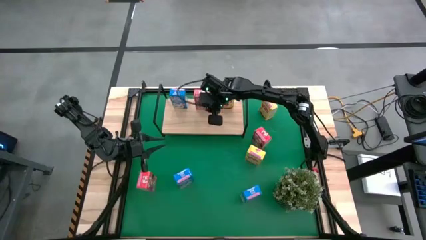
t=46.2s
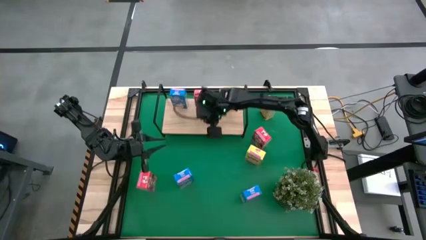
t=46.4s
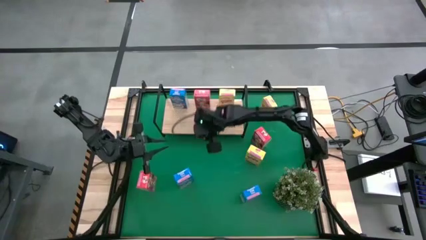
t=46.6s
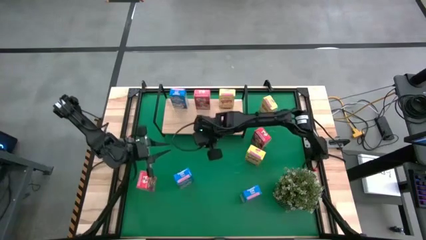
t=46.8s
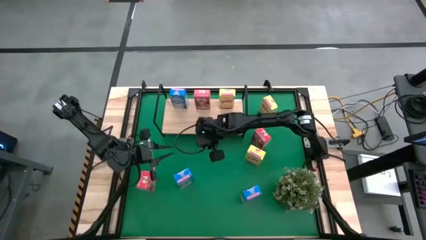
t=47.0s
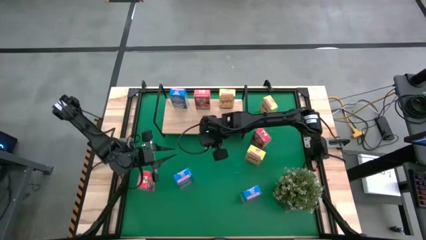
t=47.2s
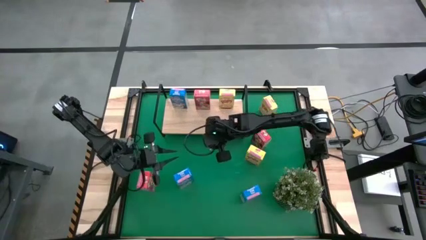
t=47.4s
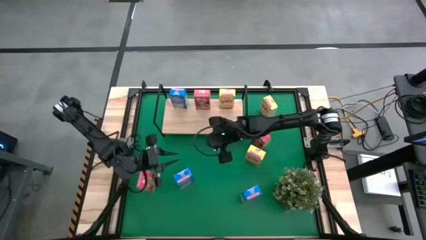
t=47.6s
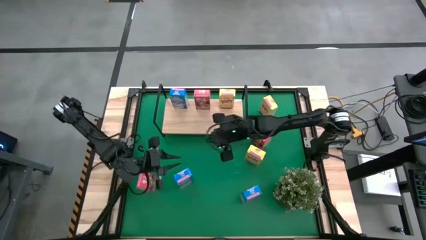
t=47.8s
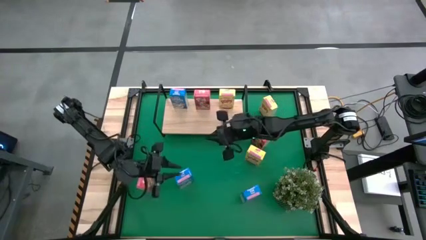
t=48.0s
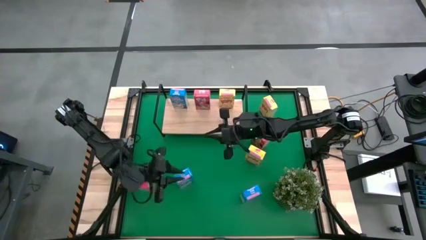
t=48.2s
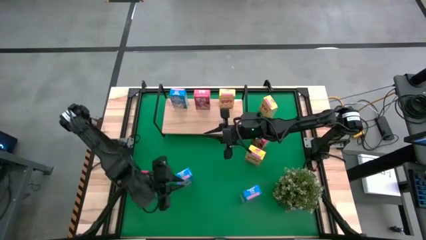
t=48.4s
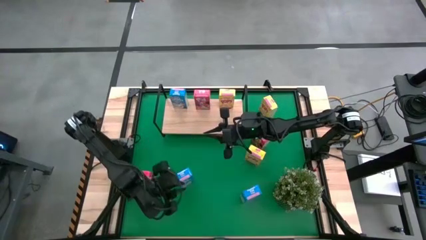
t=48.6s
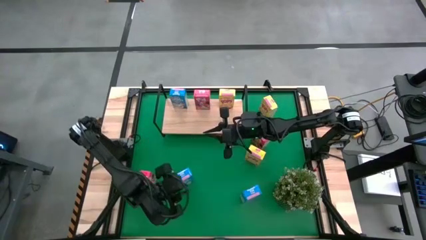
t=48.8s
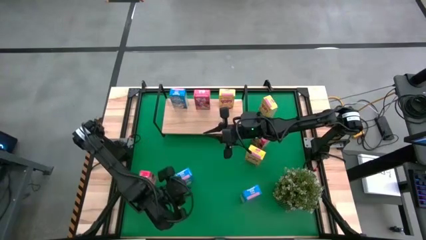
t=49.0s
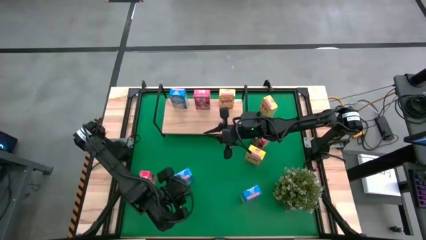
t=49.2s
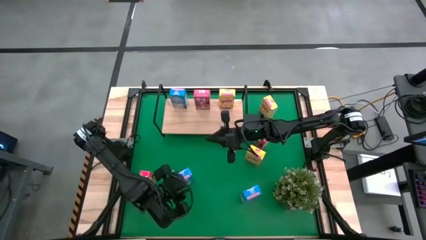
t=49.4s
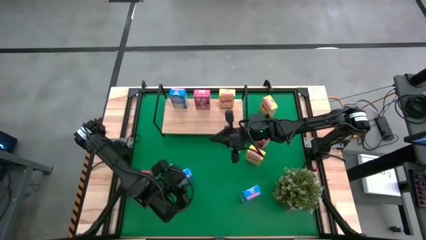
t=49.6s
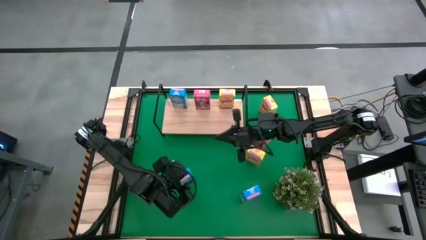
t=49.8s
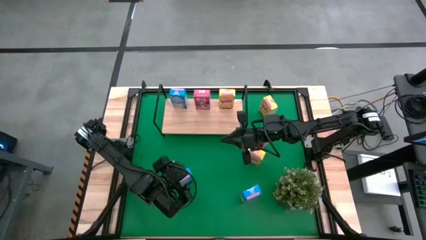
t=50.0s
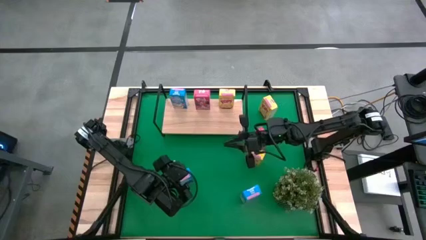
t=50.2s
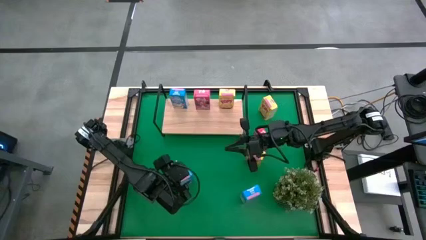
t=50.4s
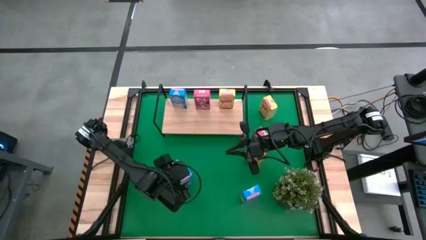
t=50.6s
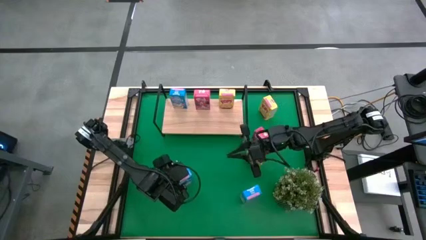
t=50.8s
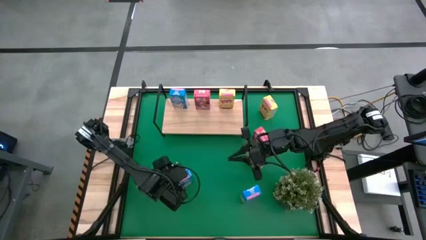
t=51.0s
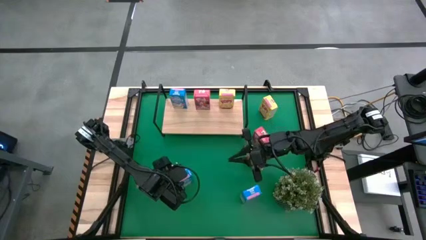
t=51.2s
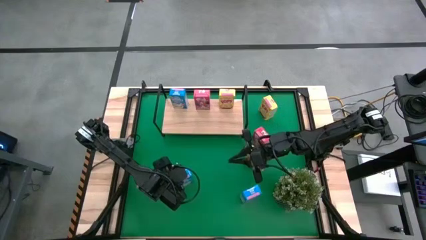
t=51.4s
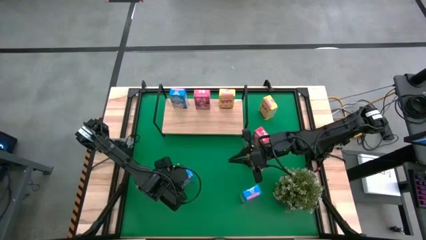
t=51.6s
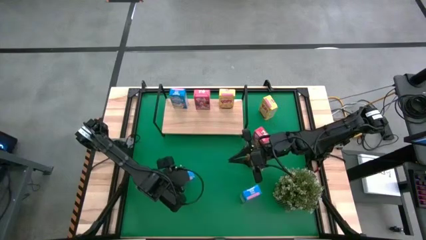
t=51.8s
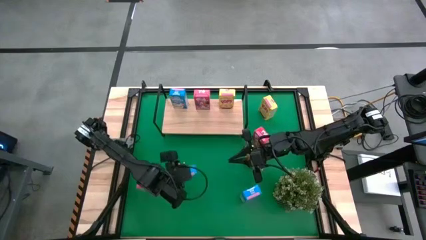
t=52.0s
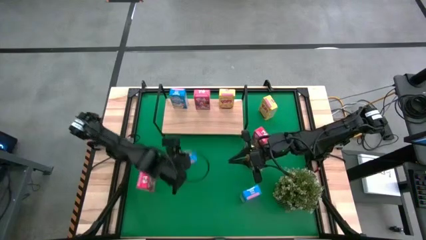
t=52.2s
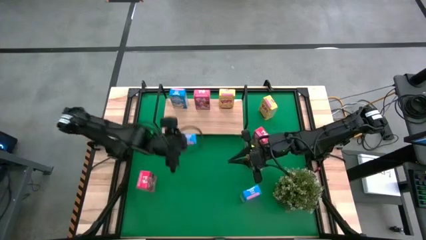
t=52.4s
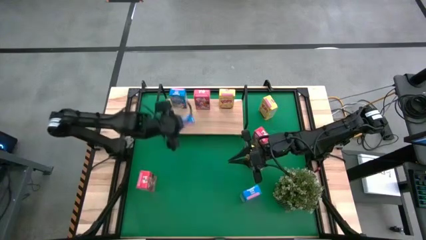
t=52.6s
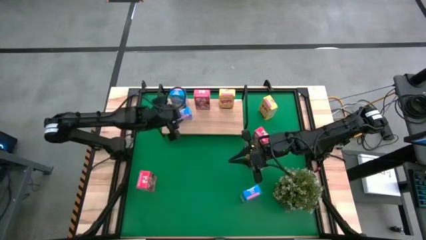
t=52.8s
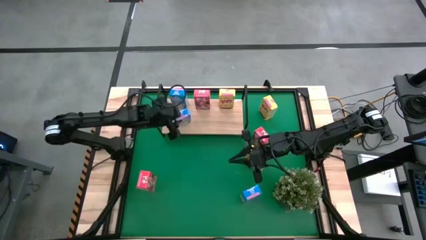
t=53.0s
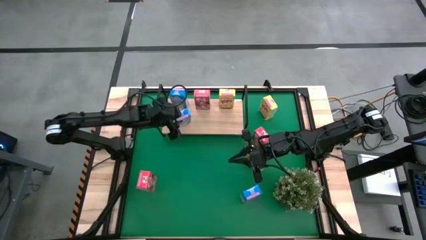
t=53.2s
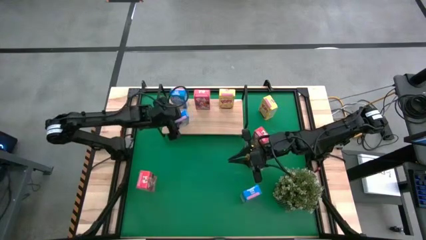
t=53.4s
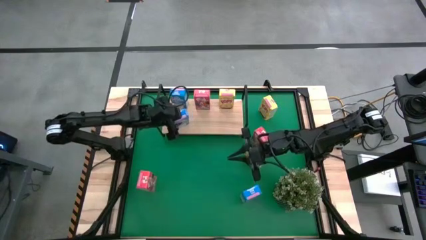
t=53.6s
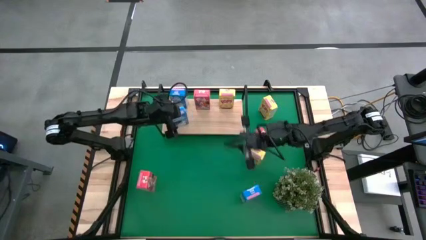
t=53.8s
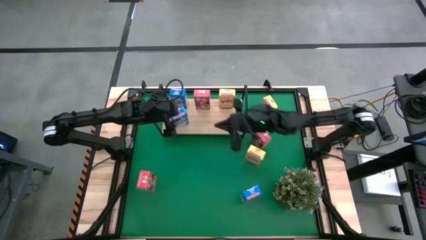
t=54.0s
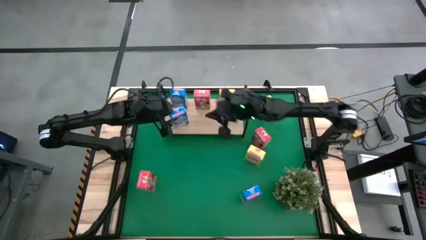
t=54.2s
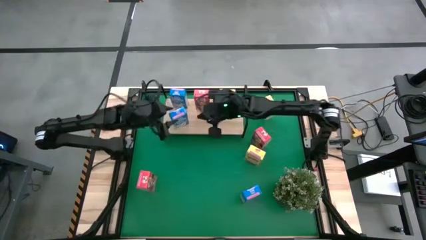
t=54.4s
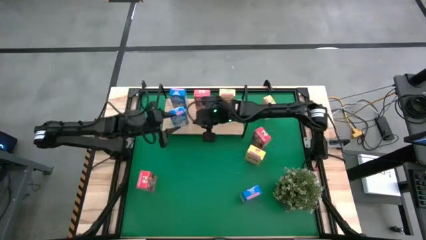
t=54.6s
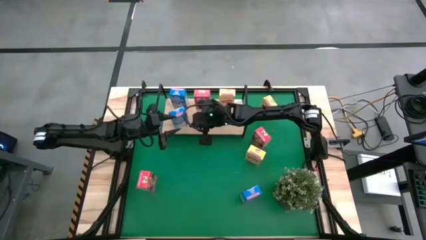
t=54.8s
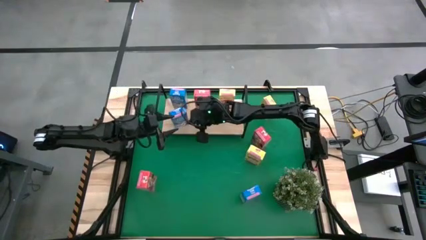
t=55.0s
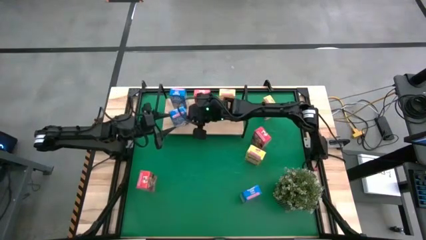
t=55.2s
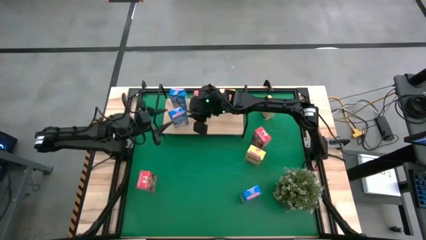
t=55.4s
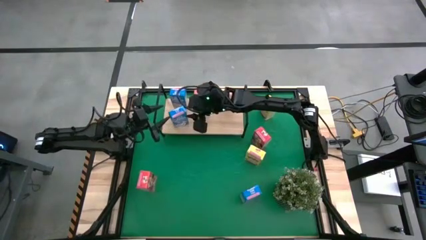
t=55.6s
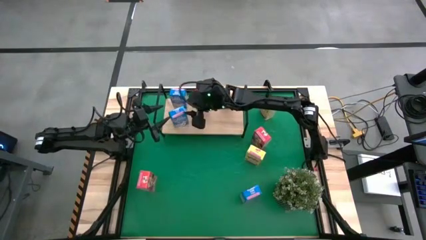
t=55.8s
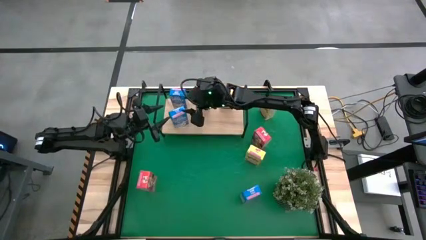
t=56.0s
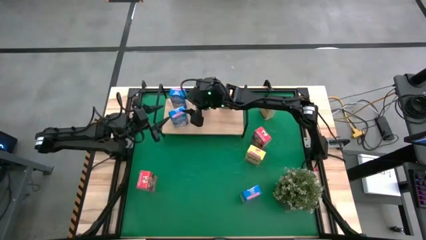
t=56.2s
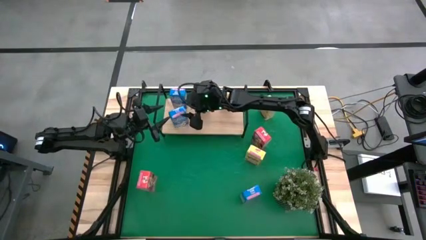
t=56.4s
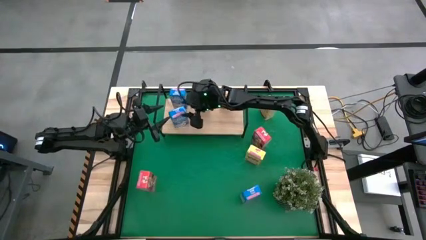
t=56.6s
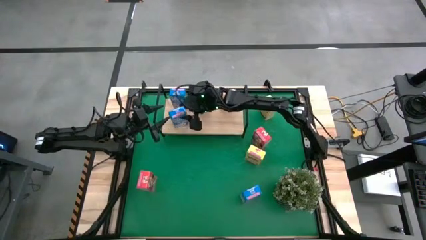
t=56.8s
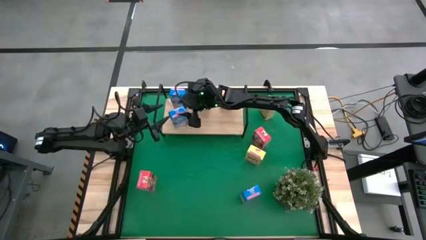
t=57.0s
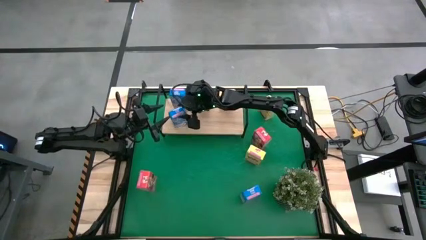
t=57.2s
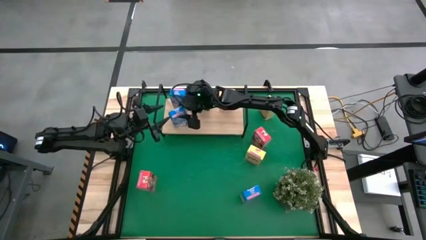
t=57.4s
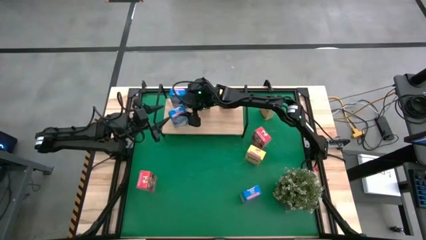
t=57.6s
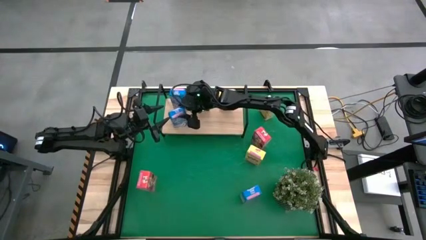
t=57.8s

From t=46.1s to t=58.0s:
Task: Stack cereal on shelf
Put the left blue cereal box on the shelf aligned with the other blue cereal box

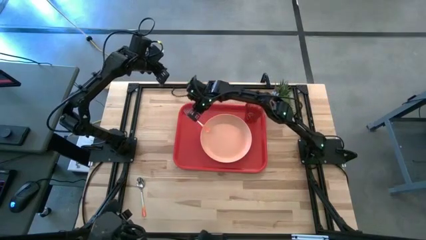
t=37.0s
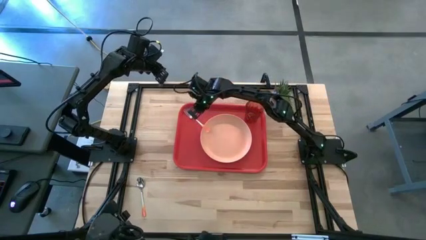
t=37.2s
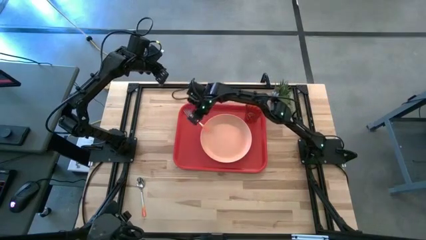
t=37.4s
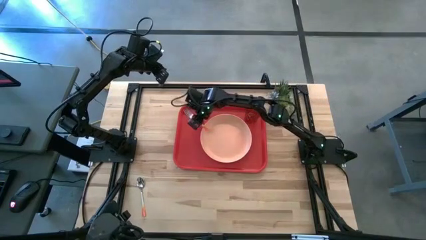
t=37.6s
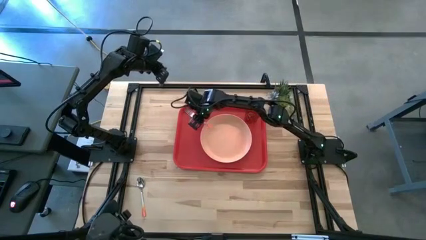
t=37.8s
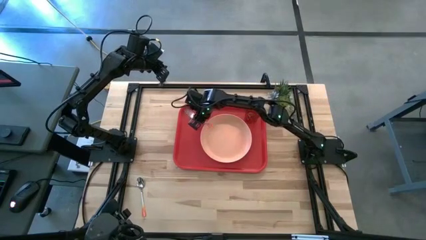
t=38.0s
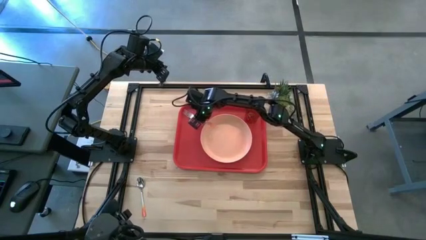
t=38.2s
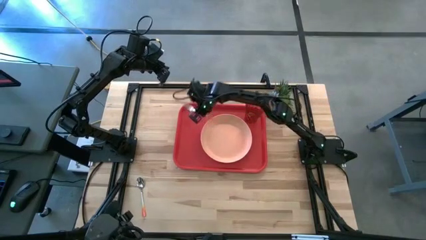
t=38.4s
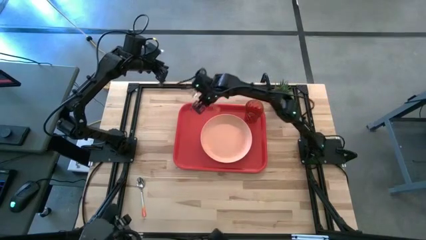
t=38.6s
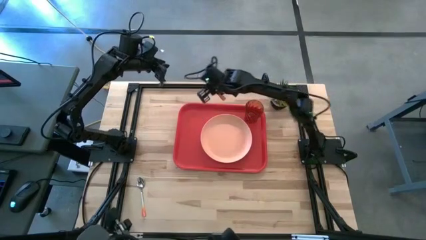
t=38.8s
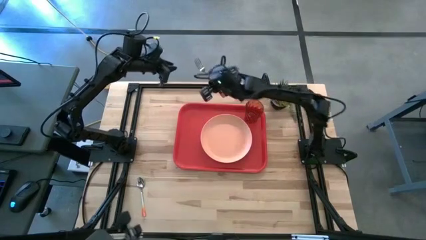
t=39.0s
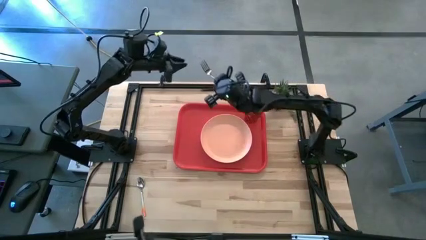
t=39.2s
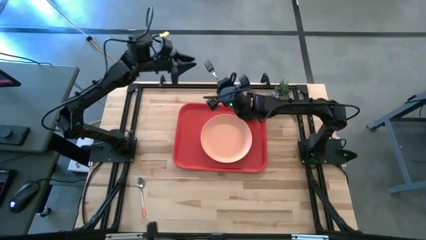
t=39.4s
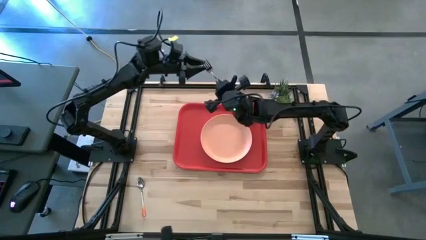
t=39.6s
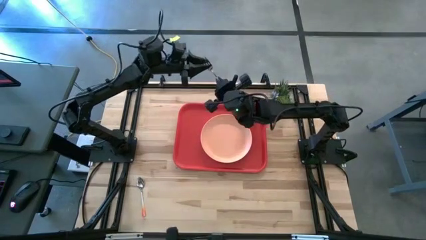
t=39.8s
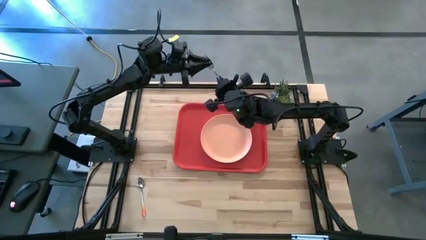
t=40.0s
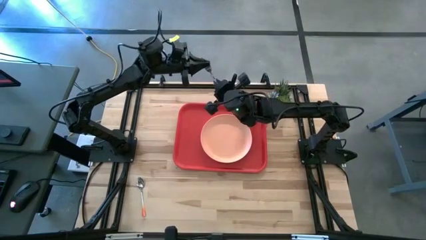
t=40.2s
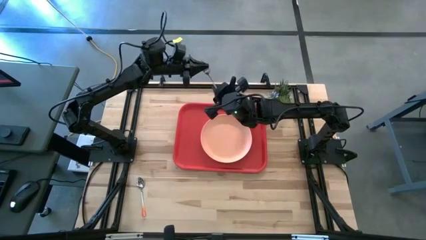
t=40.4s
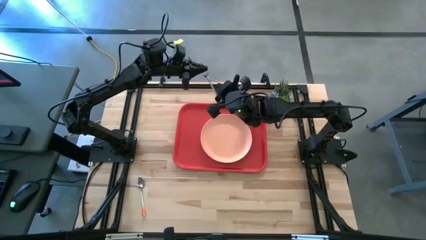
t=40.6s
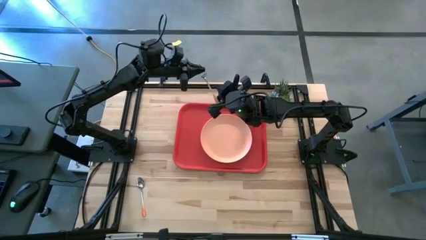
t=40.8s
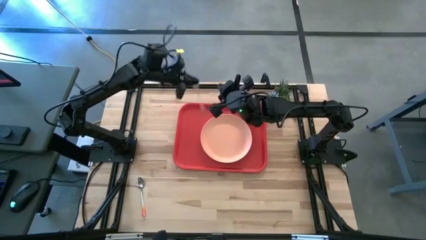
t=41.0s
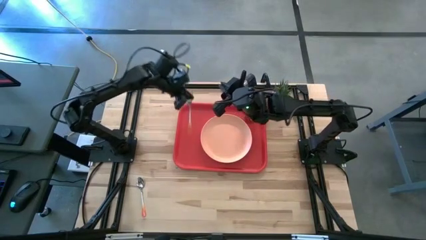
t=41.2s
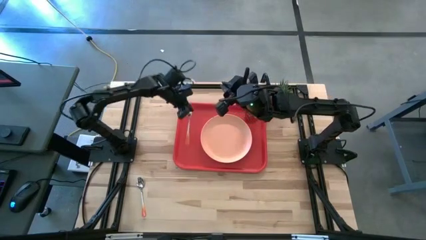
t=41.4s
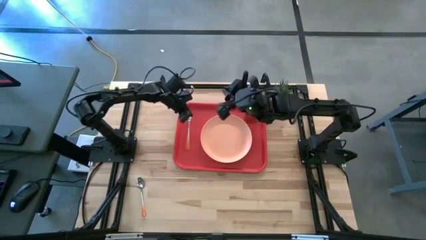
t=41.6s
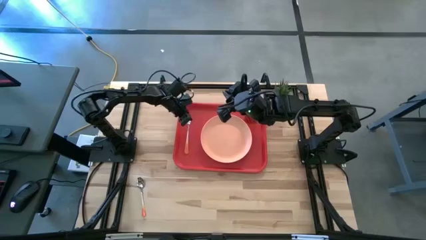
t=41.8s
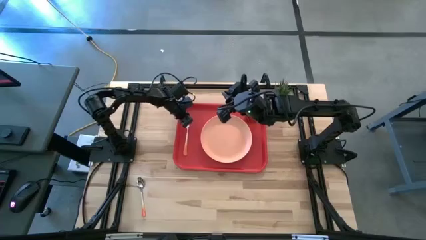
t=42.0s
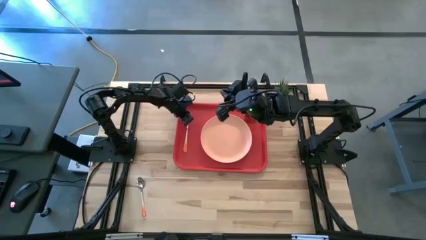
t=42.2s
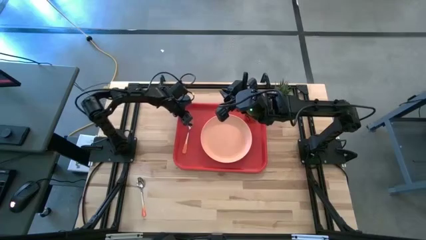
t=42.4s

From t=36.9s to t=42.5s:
Task: Pick and place plate/cup/fork/spoon on tray
Put the white orange fork on the left side of the light orange plate
